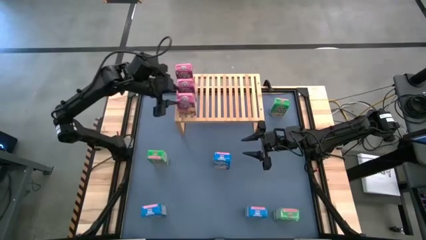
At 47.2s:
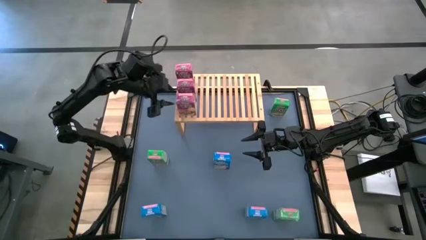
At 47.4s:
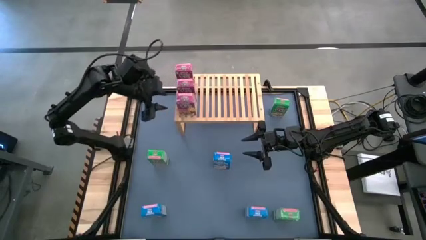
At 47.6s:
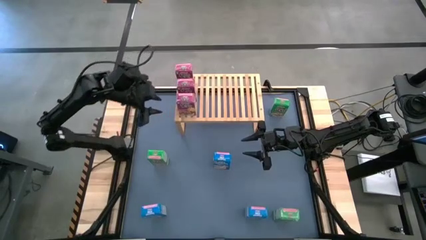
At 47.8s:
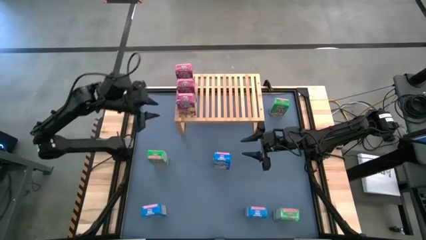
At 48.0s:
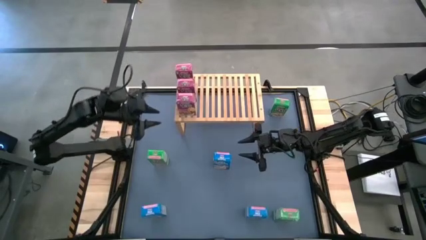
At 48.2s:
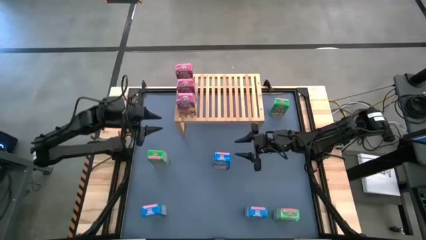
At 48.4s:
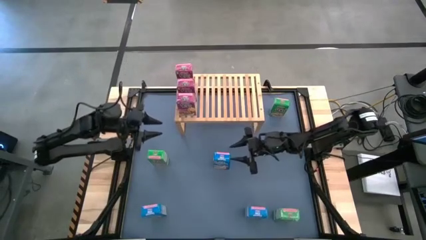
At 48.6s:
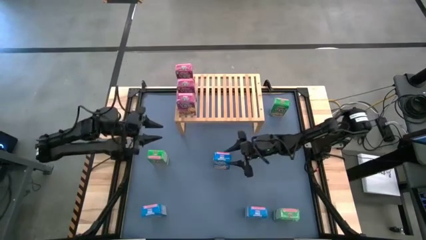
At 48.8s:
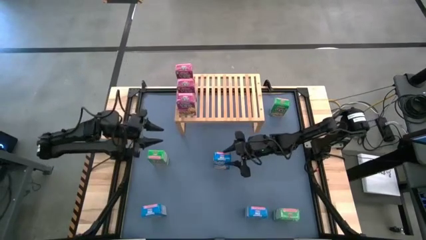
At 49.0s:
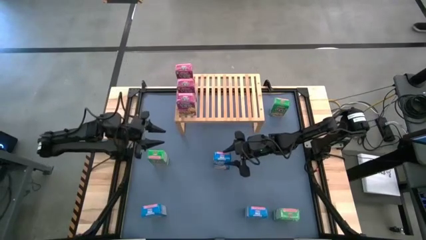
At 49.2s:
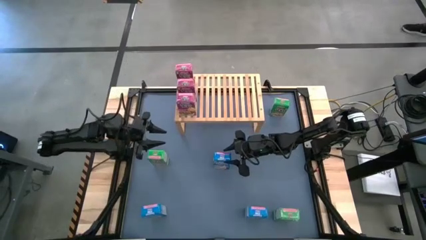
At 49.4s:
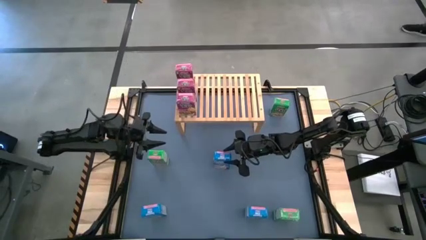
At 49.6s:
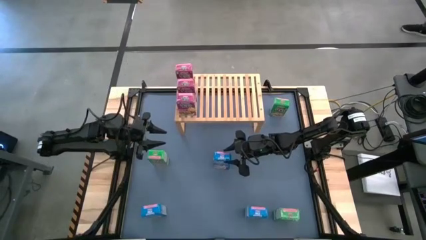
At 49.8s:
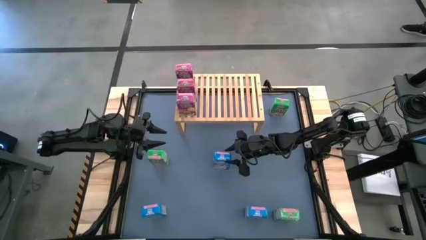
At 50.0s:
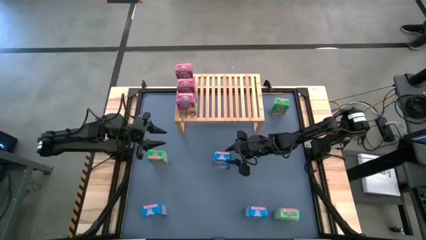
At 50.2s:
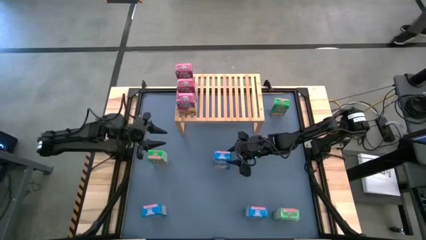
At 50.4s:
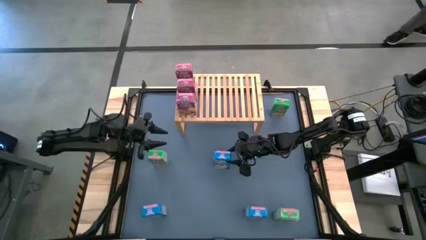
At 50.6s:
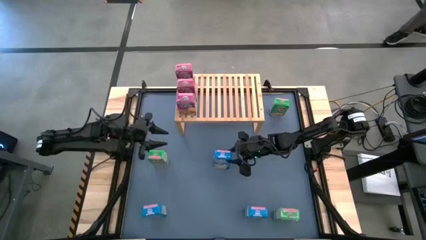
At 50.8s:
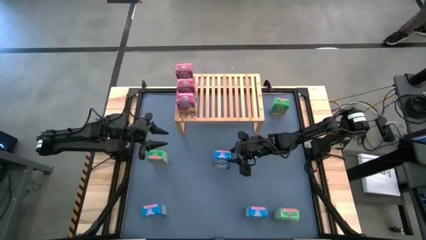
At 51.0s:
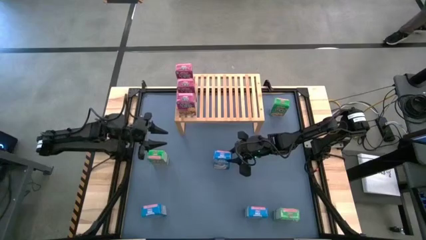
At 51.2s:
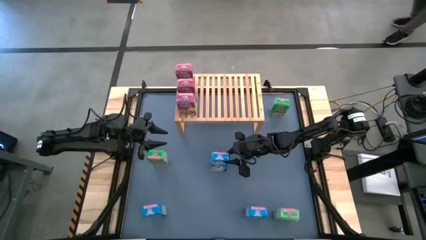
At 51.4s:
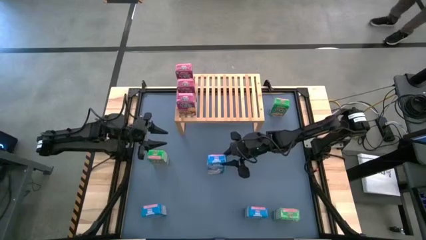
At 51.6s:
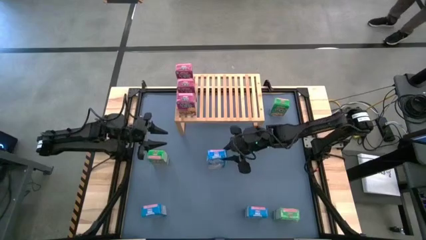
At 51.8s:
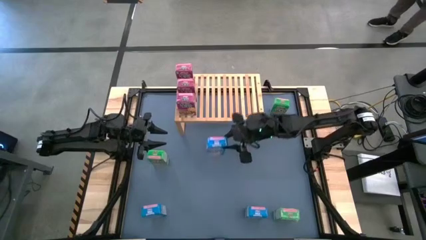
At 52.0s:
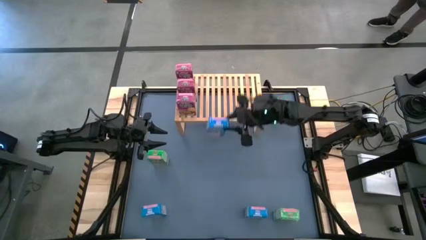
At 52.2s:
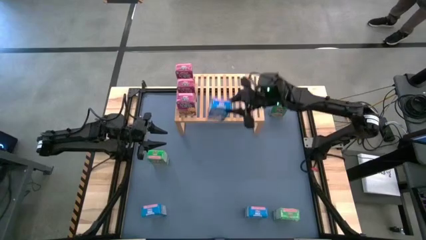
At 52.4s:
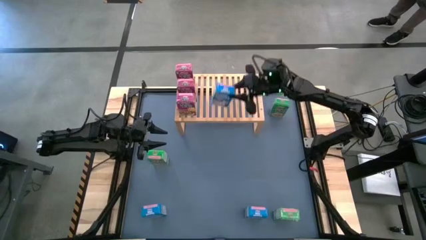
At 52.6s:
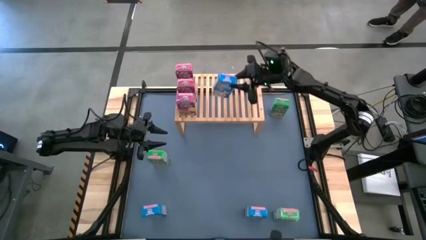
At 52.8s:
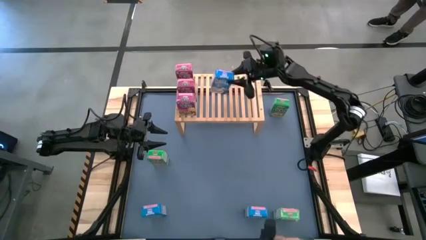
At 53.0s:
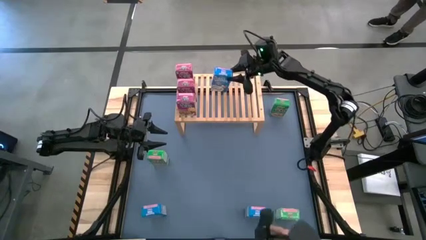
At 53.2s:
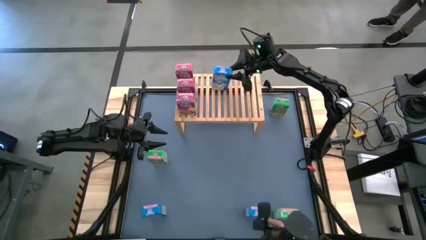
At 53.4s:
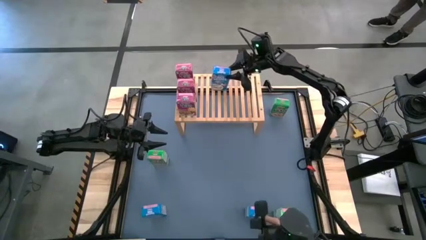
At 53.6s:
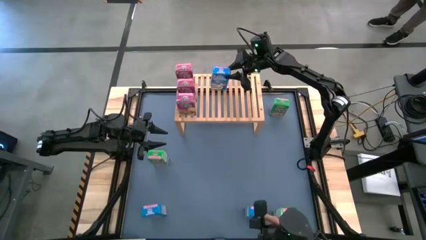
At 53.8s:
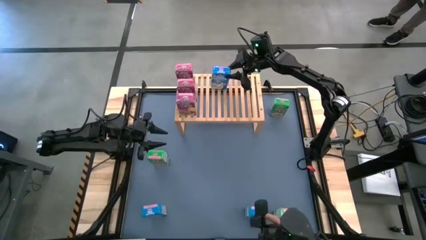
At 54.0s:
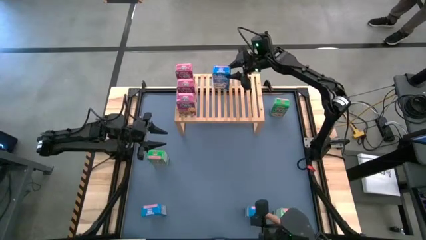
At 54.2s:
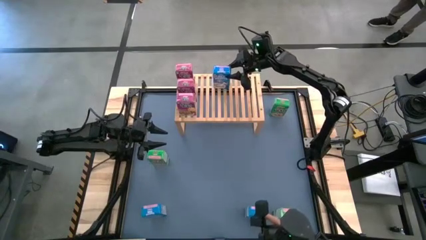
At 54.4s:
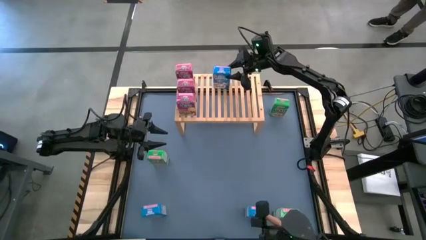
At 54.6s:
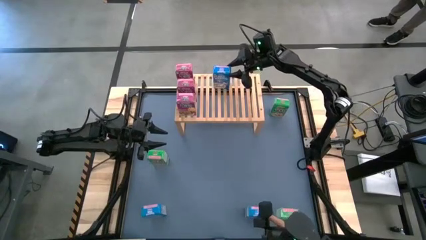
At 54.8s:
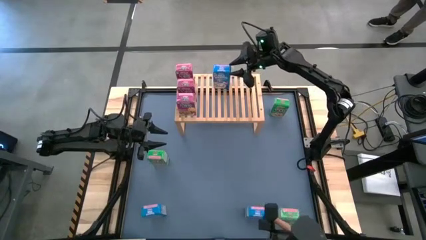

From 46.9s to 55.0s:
Task: Stack cereal on shelf
Put the top middle blue cereal box on the shelf

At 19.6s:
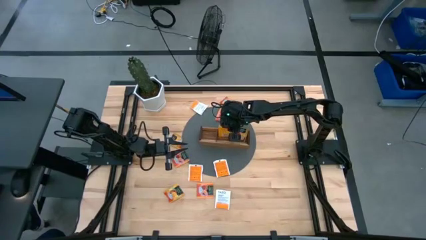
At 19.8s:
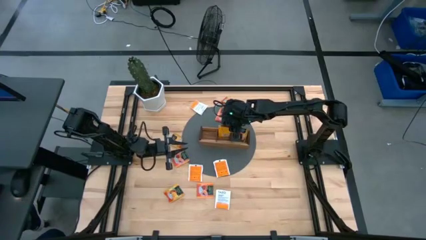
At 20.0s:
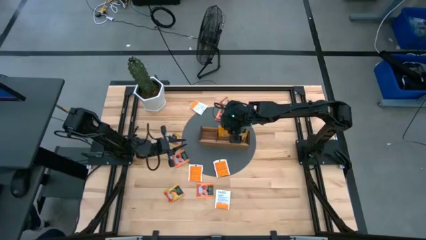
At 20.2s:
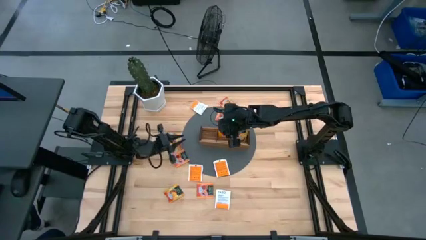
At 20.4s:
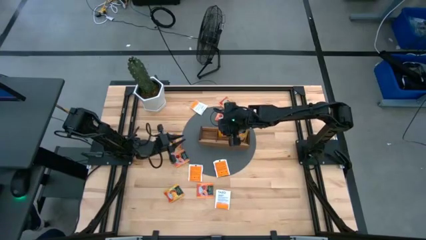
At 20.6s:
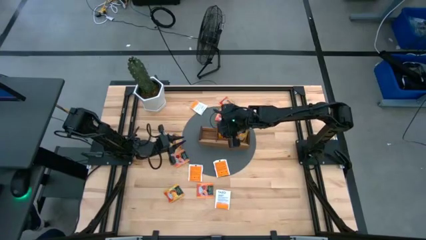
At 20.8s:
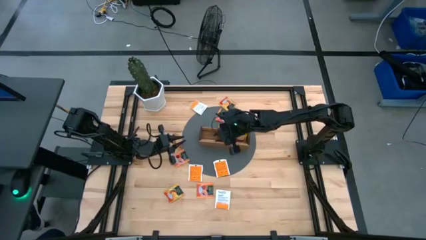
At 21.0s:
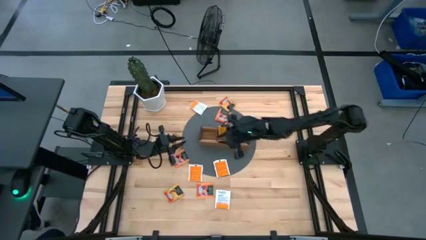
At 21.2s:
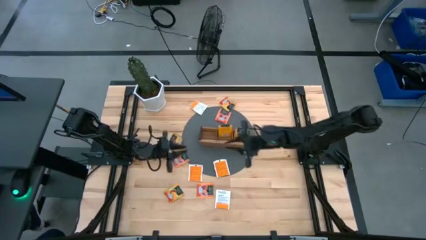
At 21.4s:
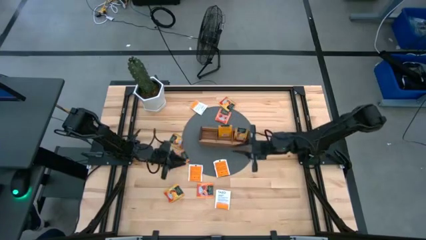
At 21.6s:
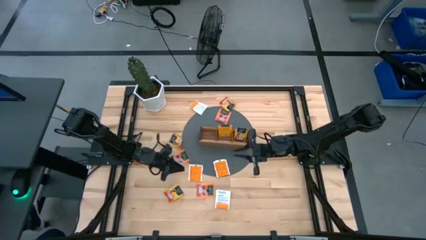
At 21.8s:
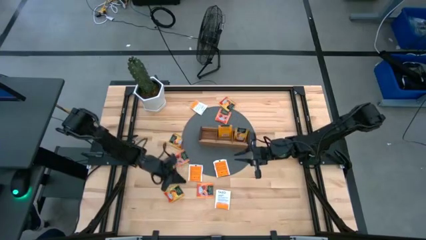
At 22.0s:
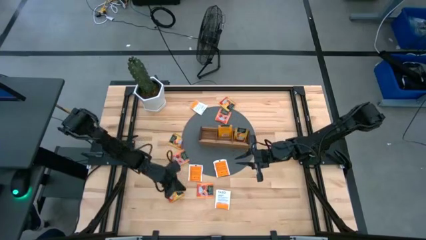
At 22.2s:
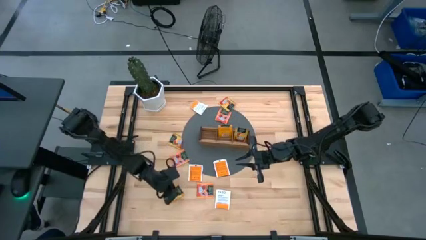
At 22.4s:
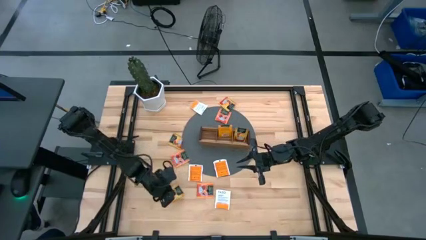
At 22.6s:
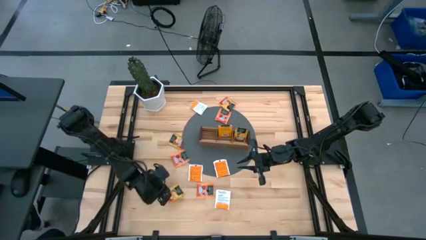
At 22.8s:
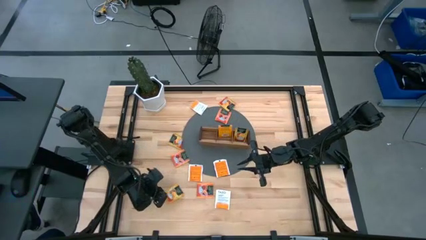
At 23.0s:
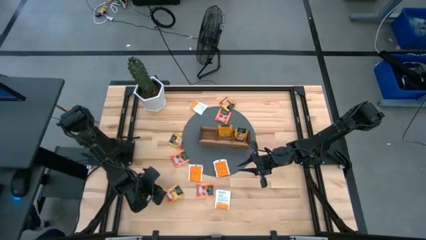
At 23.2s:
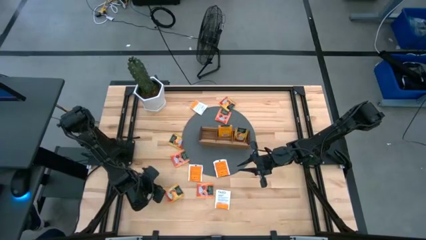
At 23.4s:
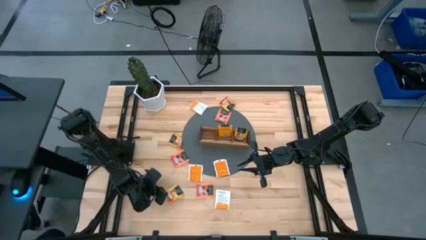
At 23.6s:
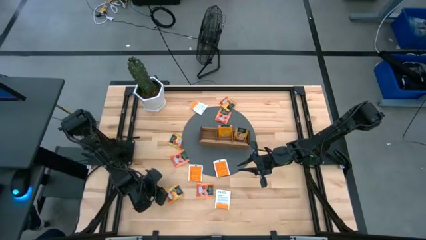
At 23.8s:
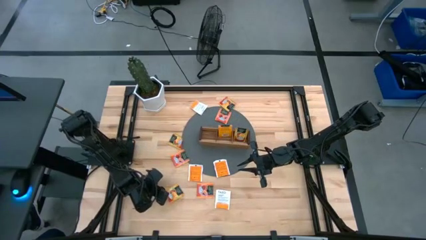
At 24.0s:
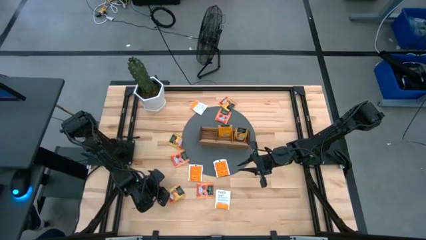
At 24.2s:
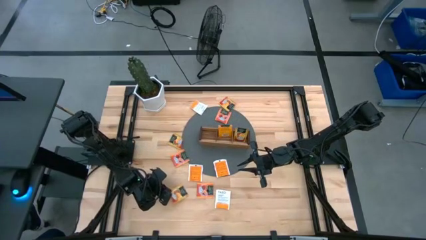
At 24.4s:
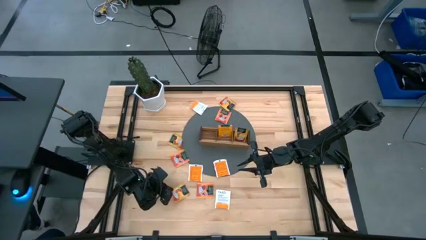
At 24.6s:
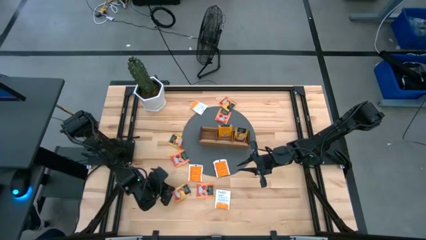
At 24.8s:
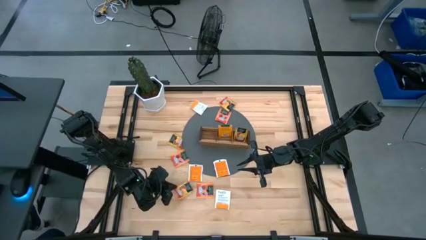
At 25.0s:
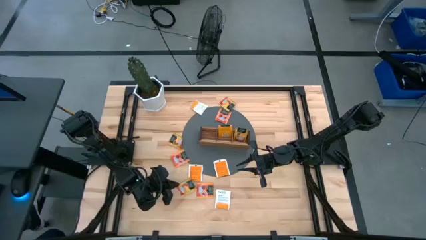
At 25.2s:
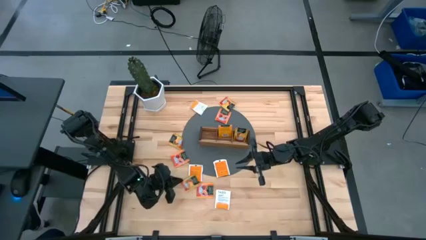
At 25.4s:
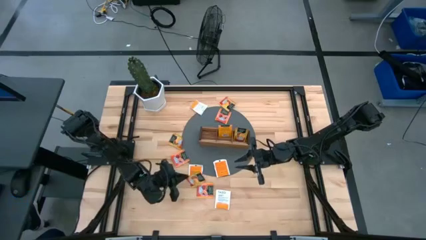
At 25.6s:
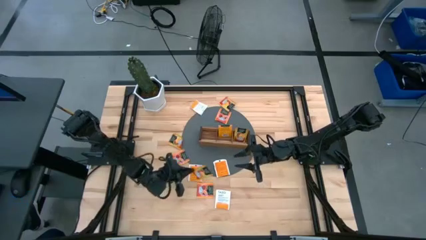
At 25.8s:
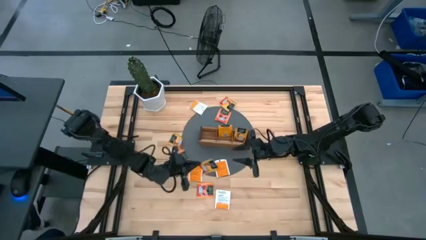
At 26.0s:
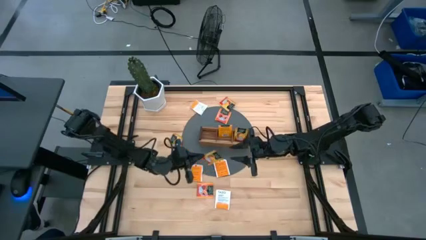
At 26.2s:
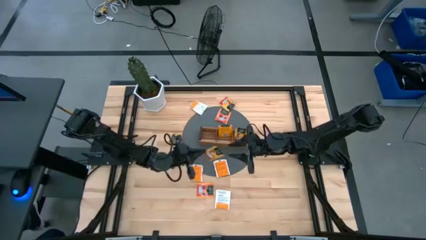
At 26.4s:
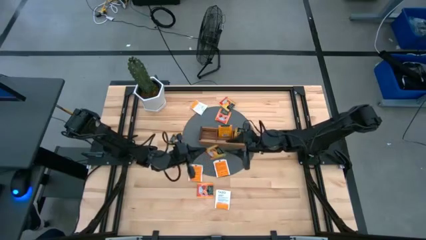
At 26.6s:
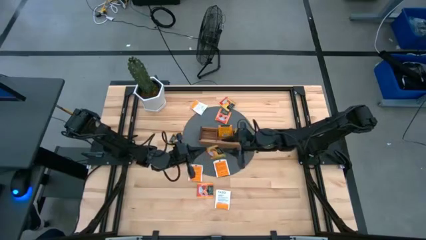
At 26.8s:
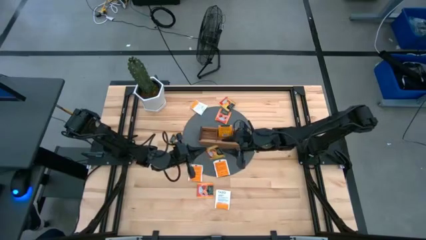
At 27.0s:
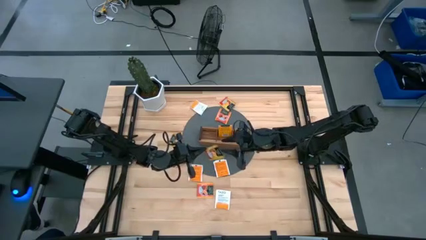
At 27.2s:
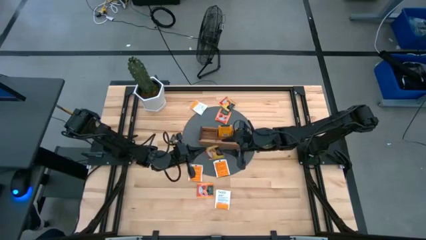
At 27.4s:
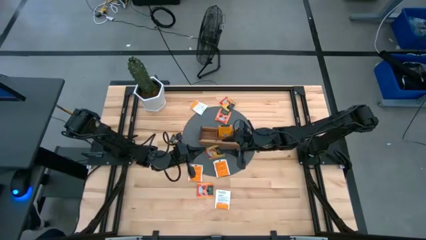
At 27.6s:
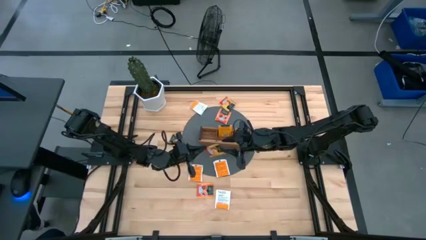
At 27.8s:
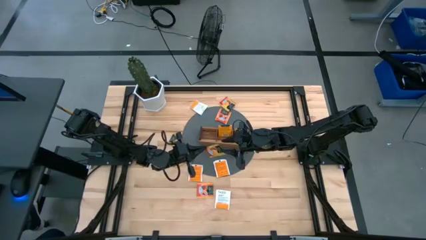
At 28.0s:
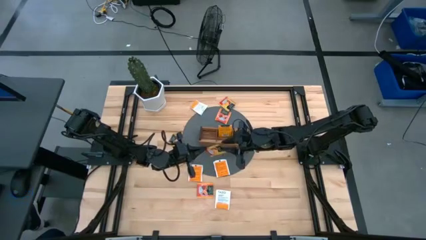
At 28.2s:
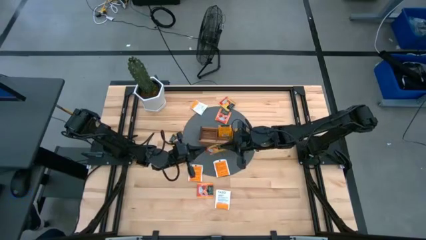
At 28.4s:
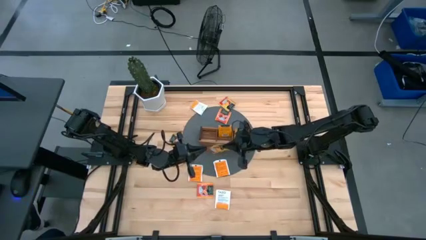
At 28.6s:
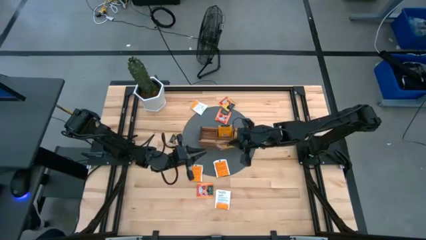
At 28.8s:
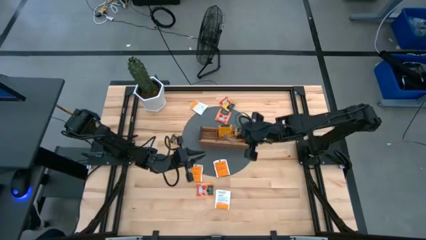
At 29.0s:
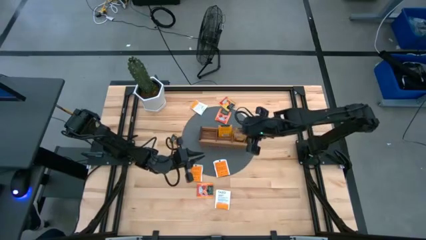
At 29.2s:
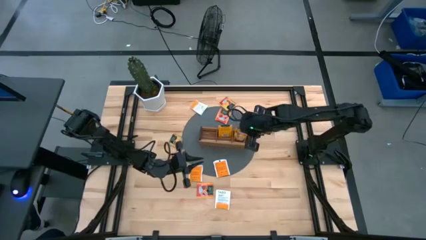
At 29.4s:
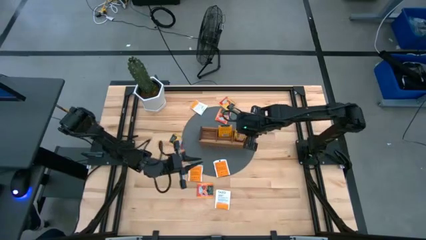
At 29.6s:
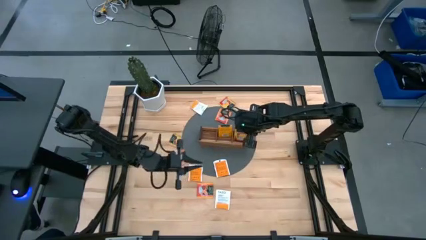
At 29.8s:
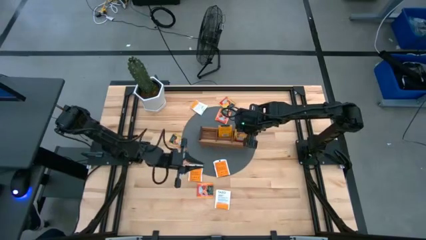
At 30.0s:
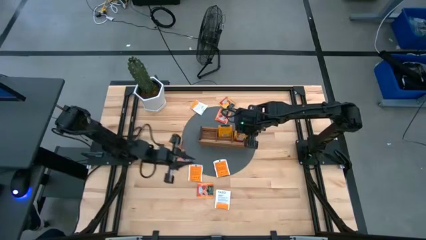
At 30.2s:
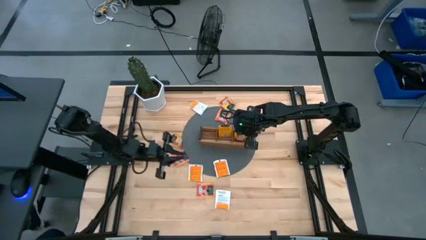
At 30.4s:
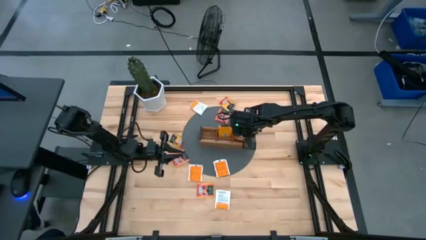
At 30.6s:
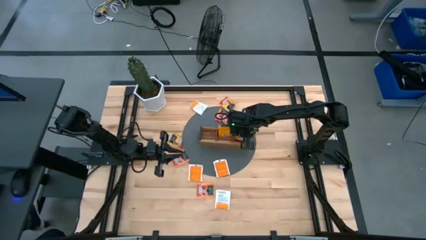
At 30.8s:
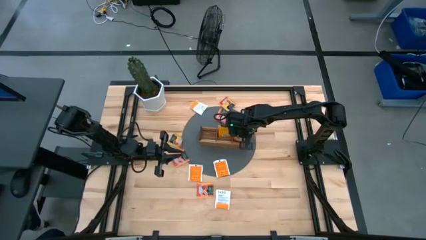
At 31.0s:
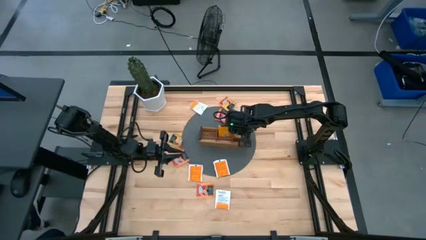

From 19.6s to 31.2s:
Task: Pick & Place Tea
Put the yellow tea bag into the right section of the wooden organizer
